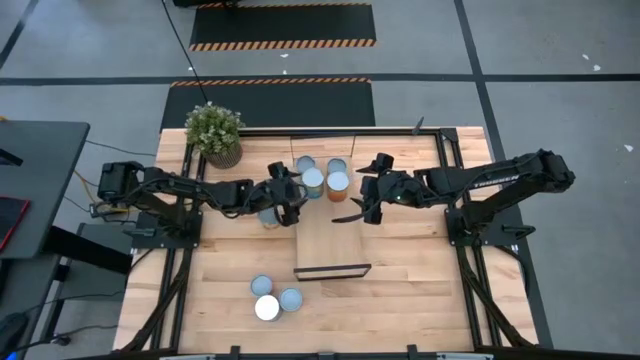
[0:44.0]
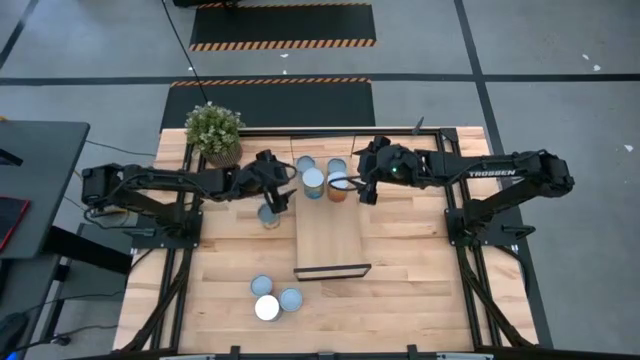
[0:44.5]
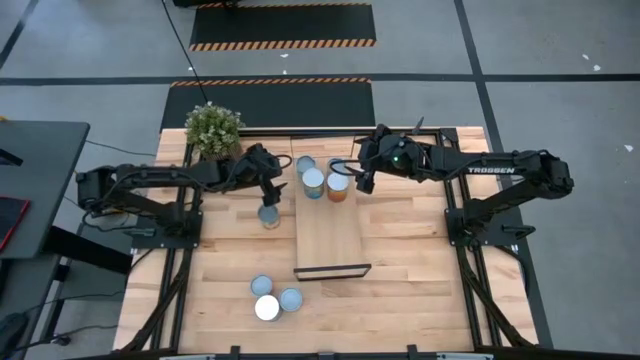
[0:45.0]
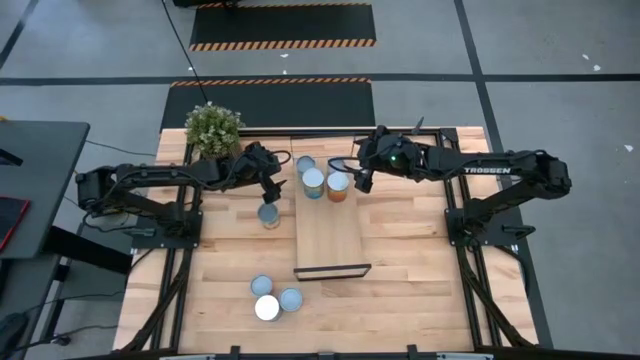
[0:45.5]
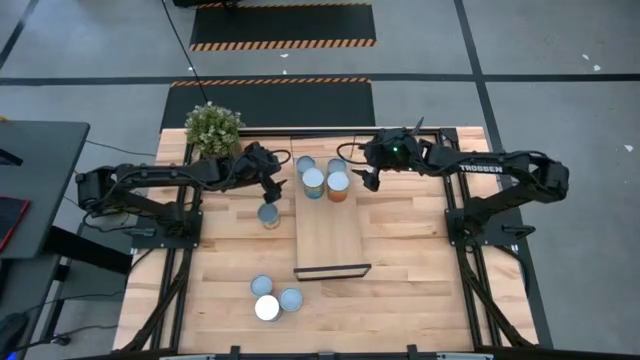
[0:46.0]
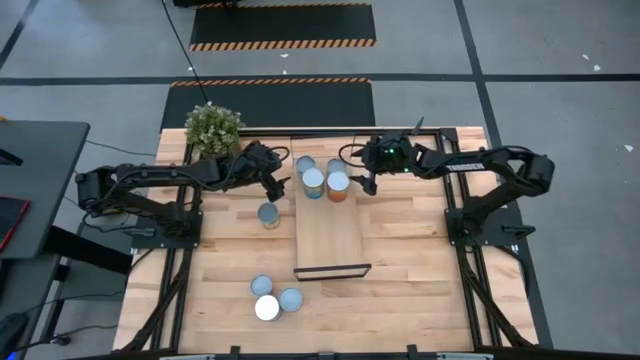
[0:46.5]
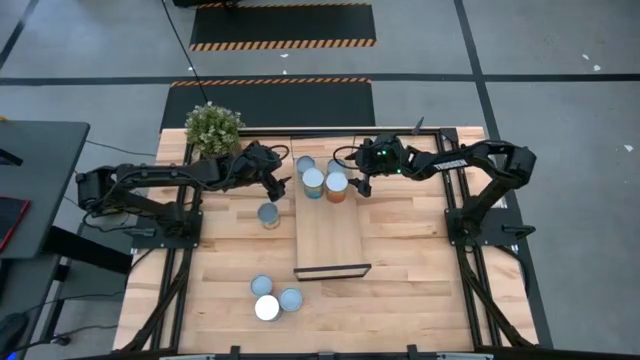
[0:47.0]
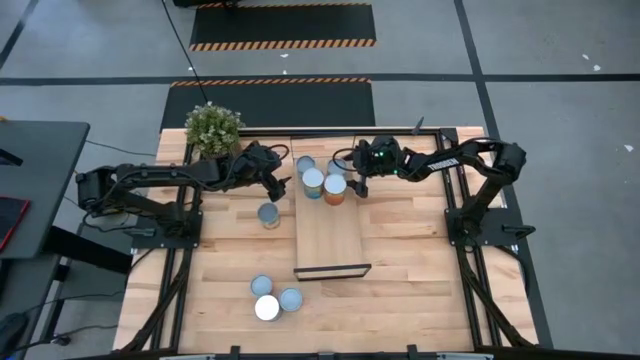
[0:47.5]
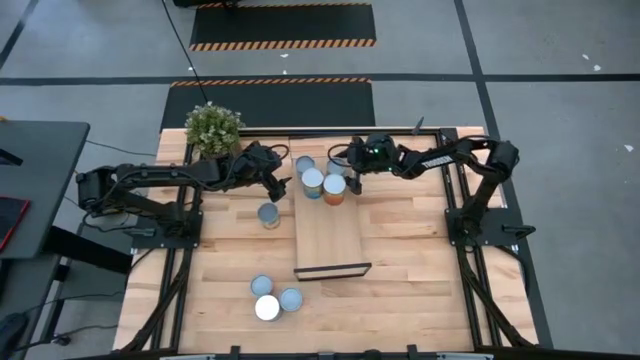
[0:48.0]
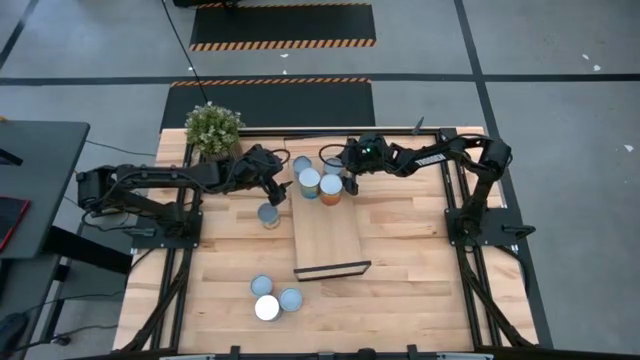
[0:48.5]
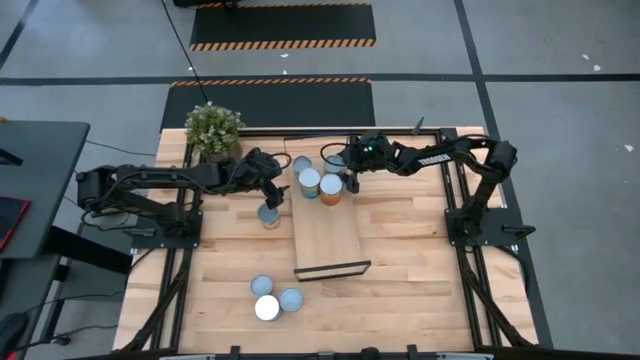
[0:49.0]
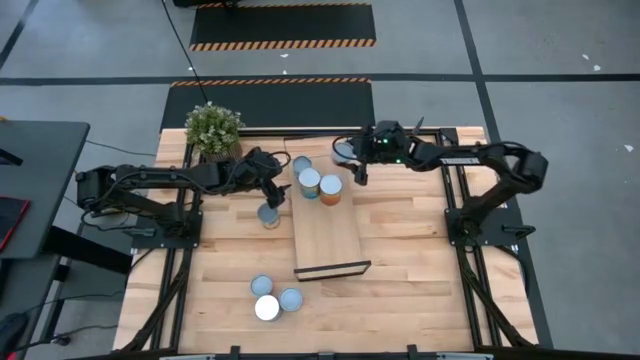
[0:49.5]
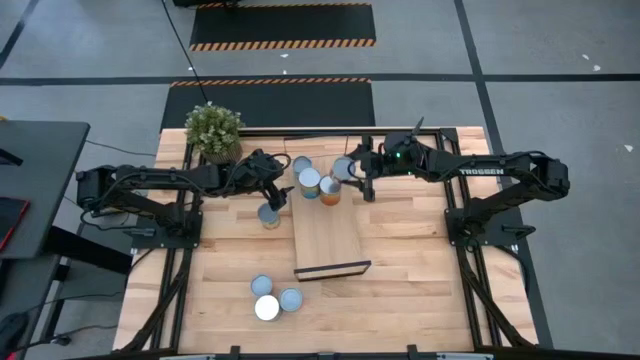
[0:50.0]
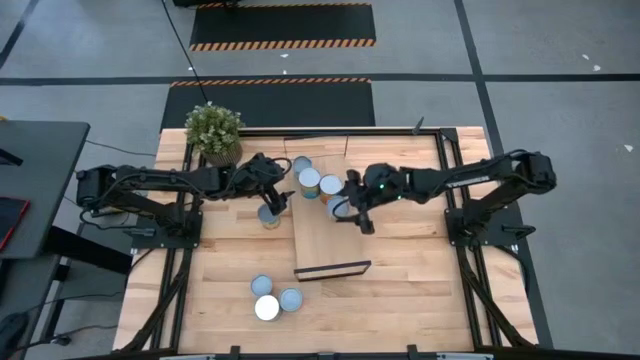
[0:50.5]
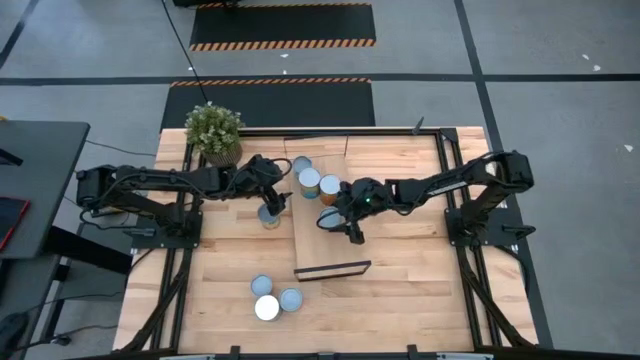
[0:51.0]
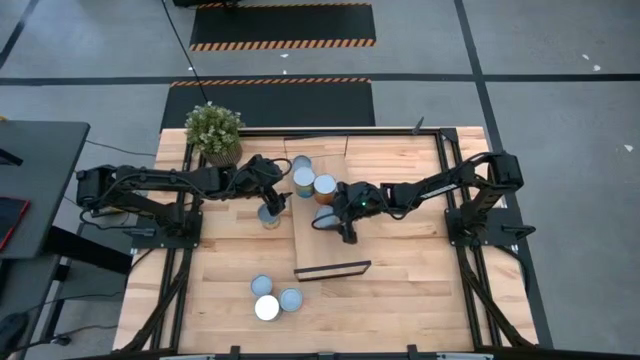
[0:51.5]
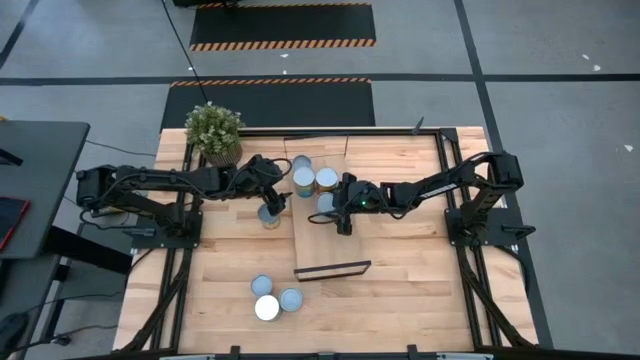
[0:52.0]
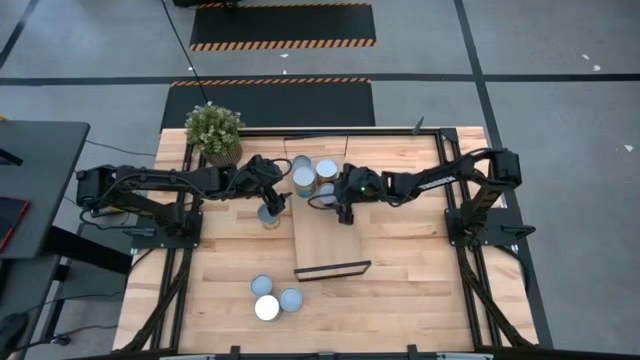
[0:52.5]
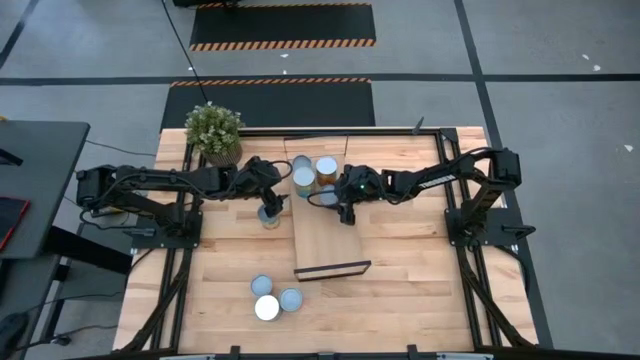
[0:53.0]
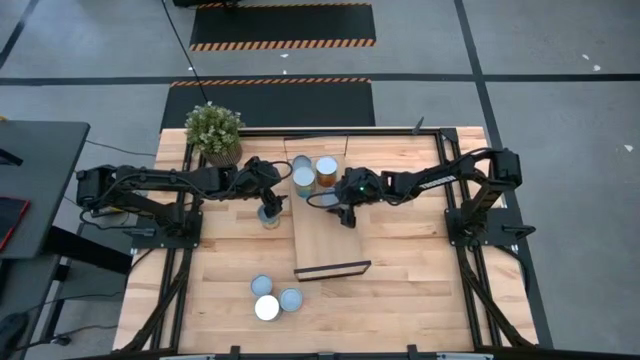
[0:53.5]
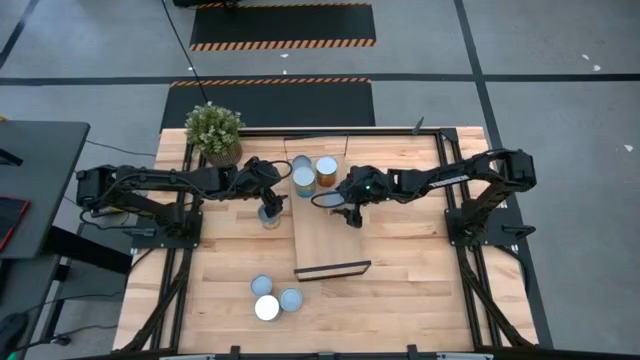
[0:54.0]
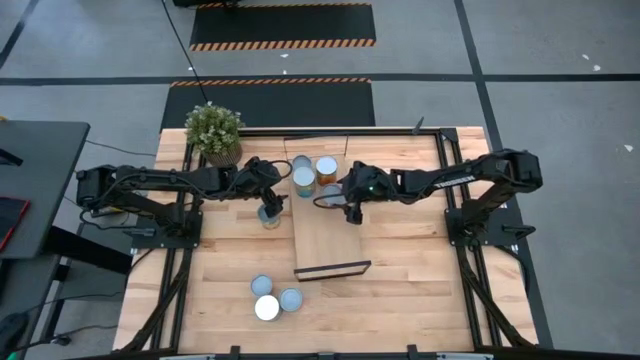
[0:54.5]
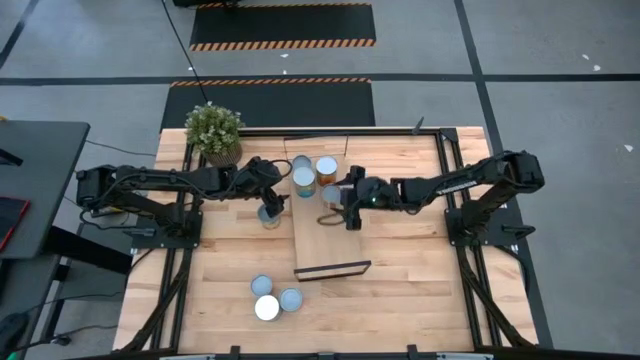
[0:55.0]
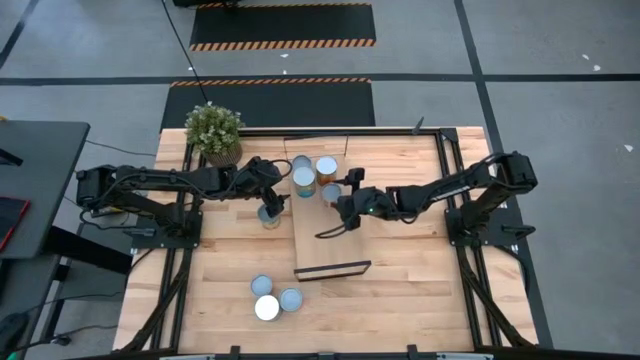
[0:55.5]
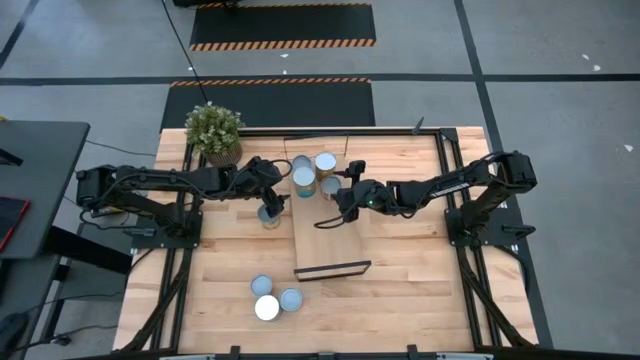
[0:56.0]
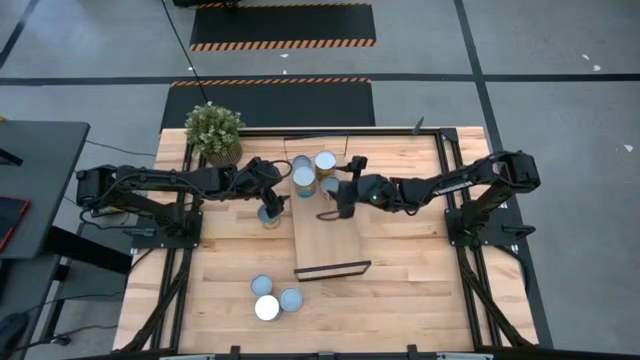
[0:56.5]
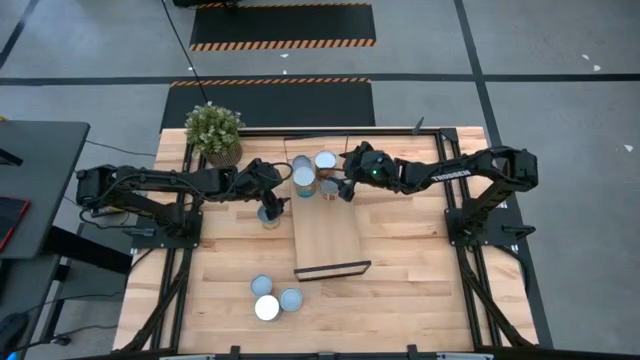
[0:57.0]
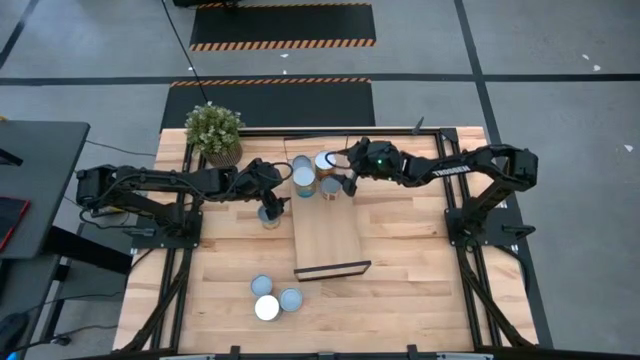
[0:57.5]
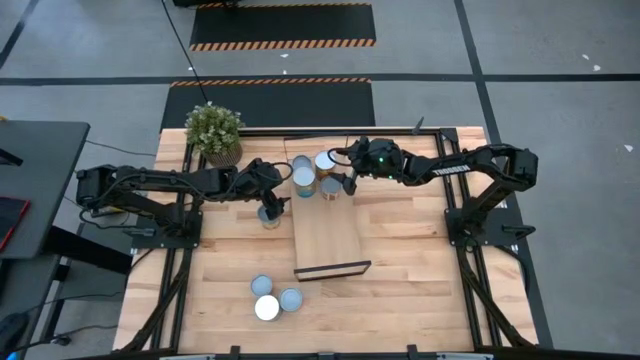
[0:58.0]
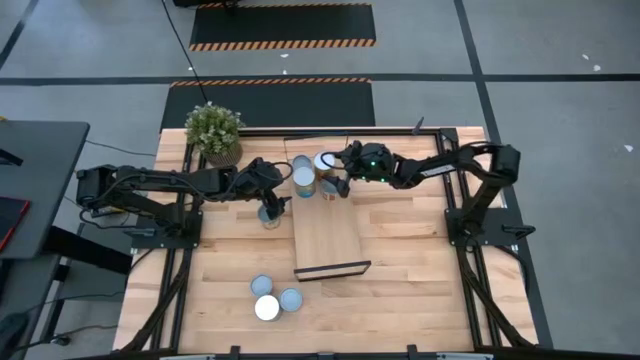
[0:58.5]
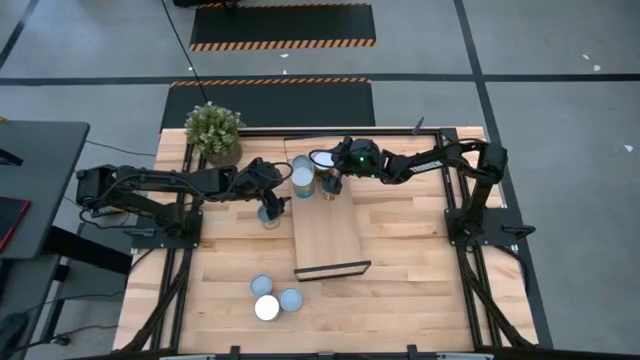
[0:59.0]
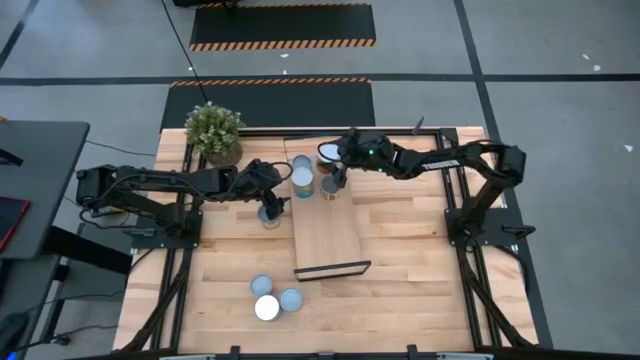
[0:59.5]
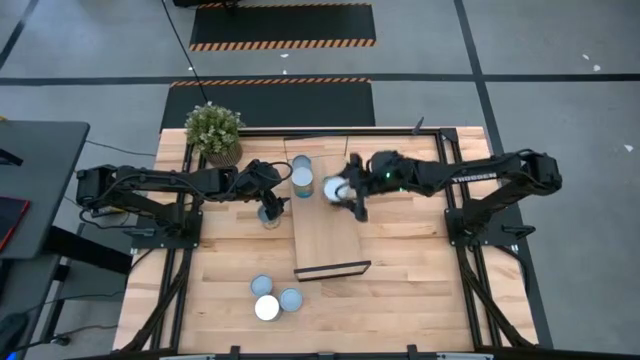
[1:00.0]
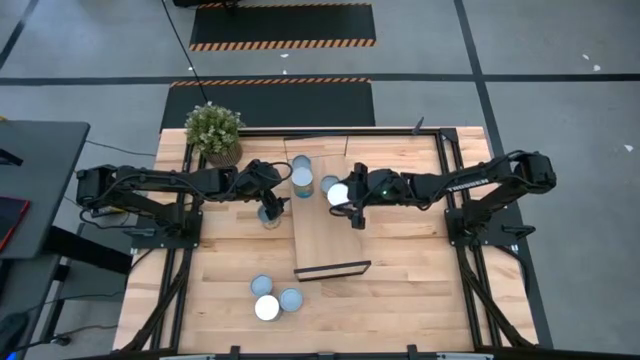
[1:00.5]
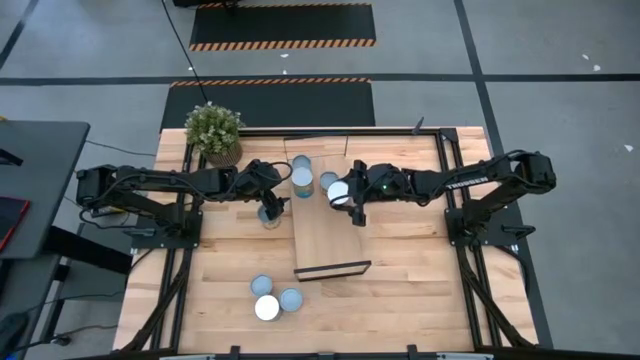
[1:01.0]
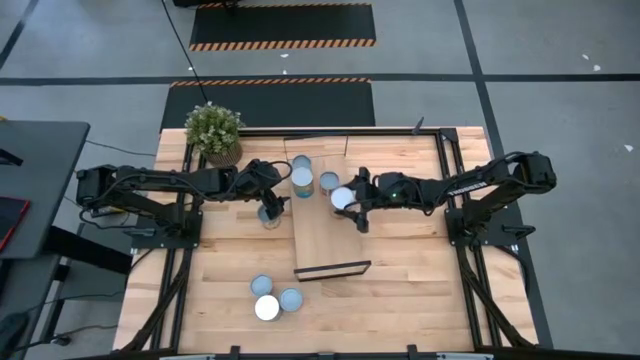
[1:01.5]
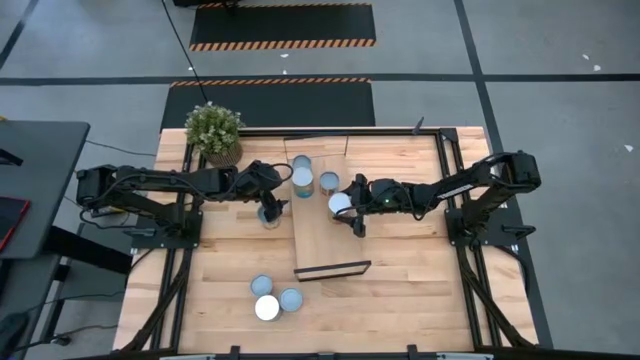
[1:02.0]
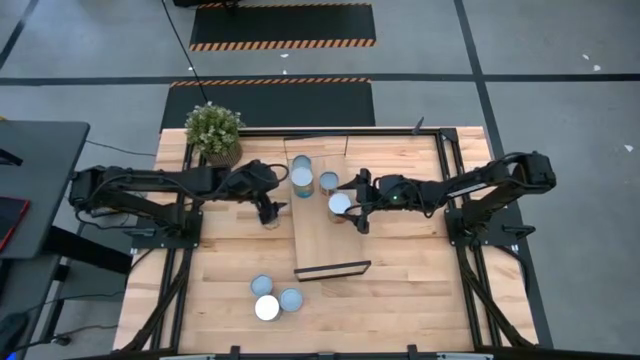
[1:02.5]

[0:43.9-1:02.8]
Task: Pick and place cans onto a shelf
Adjust the cans on the shelf
